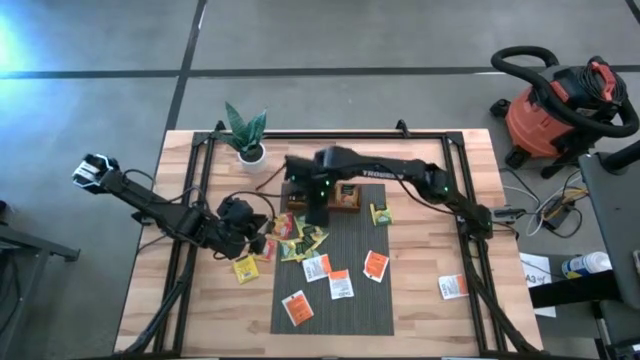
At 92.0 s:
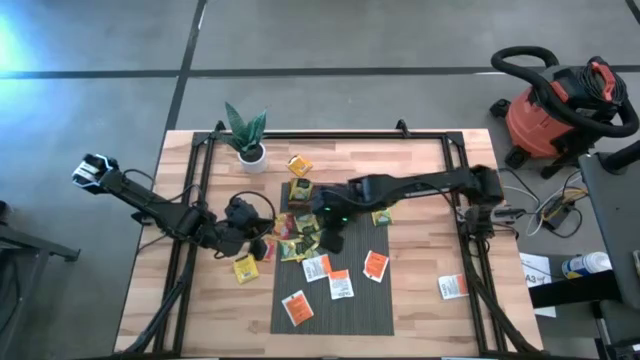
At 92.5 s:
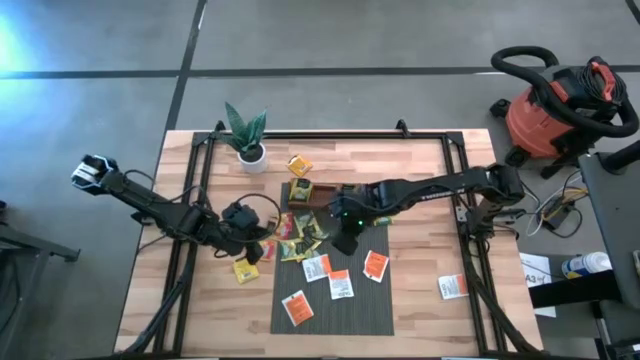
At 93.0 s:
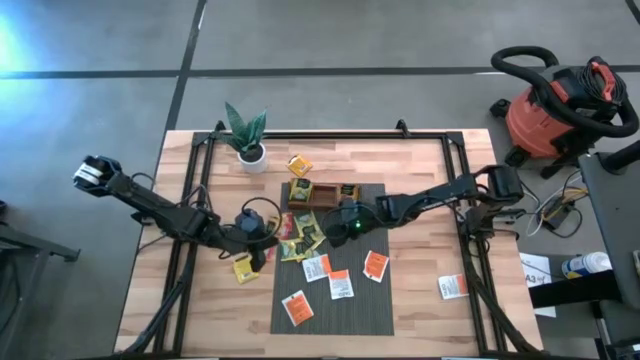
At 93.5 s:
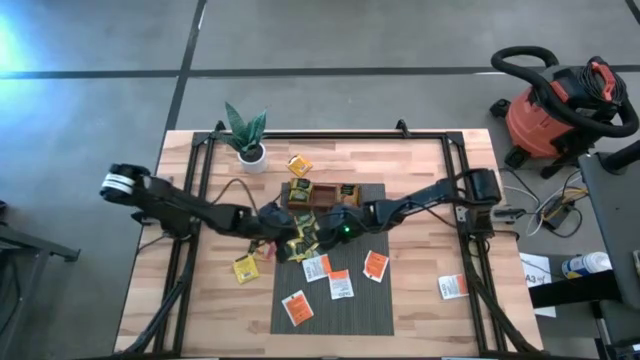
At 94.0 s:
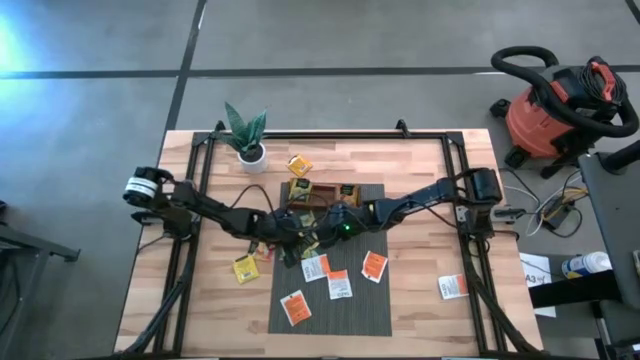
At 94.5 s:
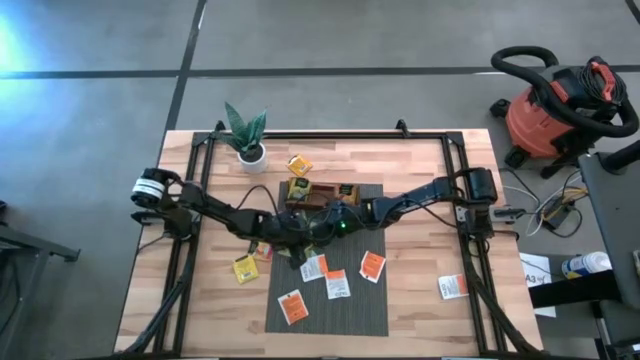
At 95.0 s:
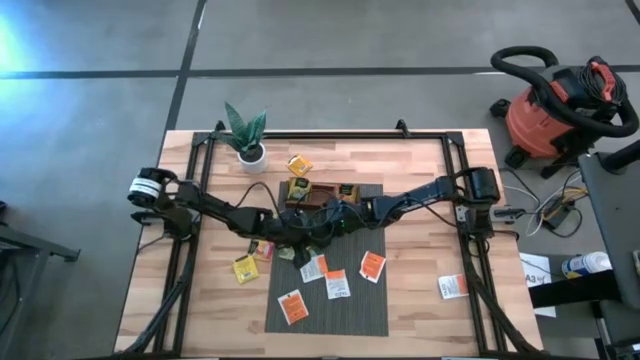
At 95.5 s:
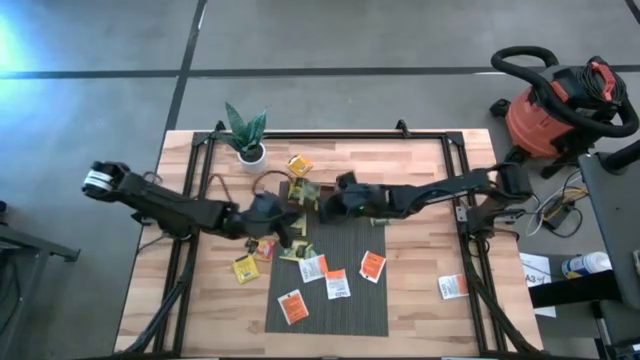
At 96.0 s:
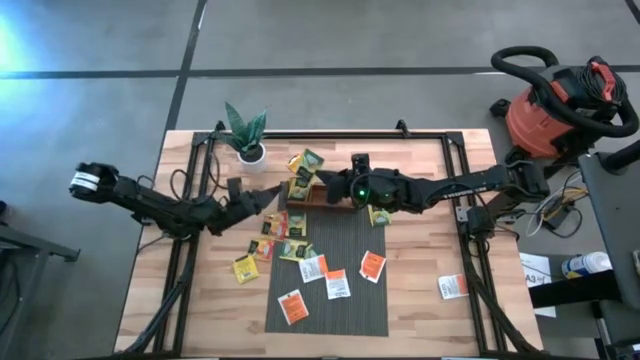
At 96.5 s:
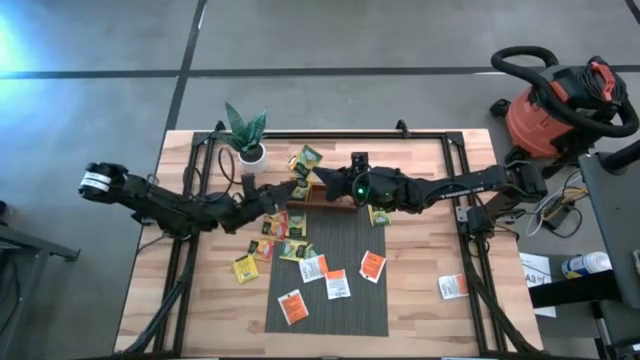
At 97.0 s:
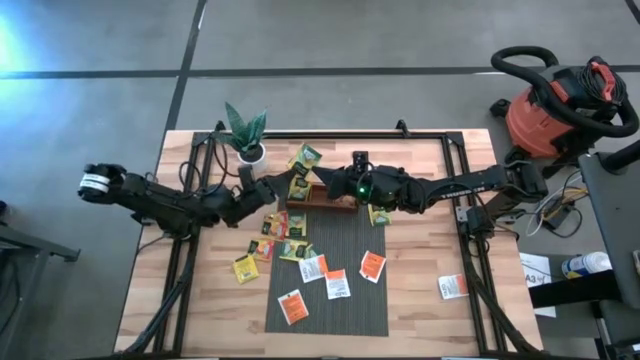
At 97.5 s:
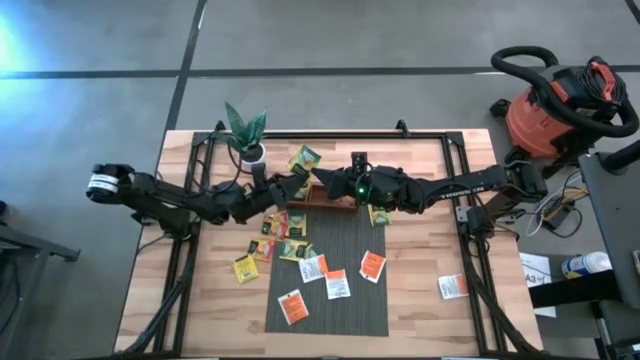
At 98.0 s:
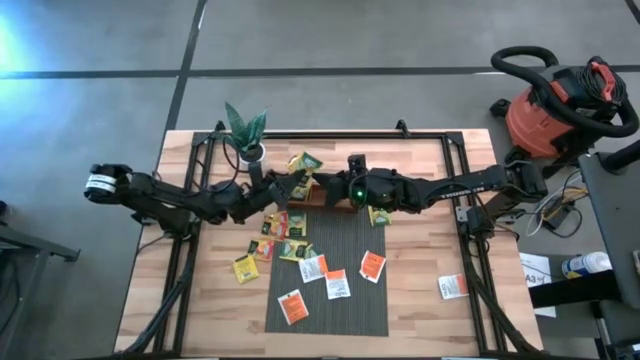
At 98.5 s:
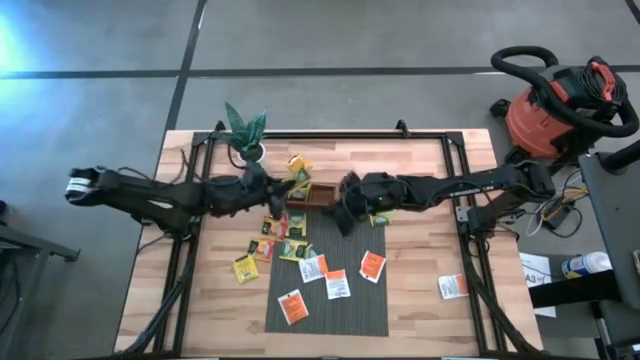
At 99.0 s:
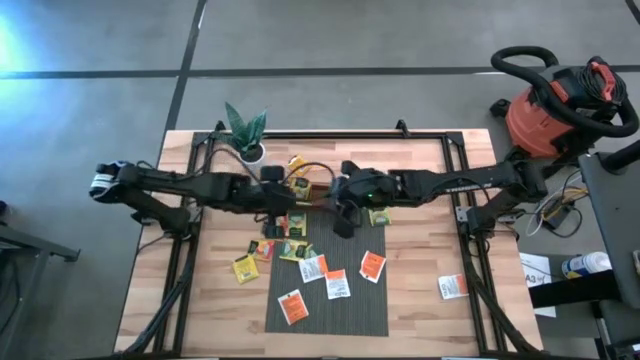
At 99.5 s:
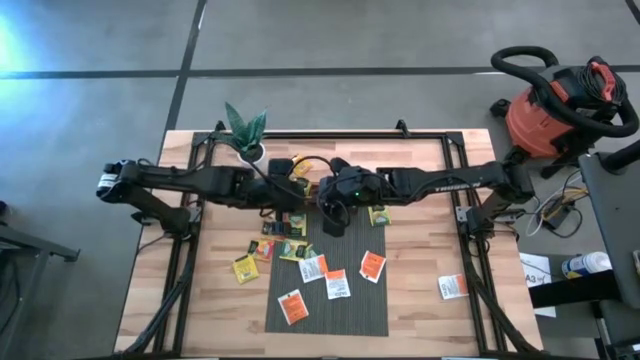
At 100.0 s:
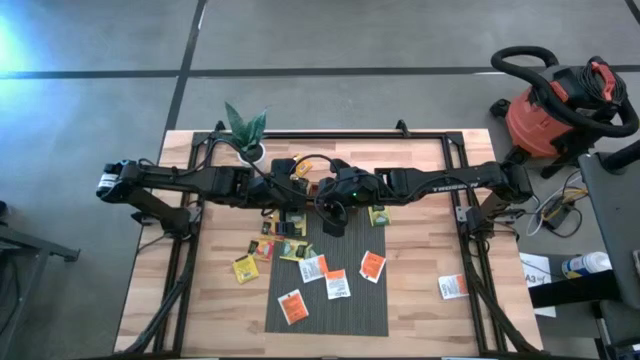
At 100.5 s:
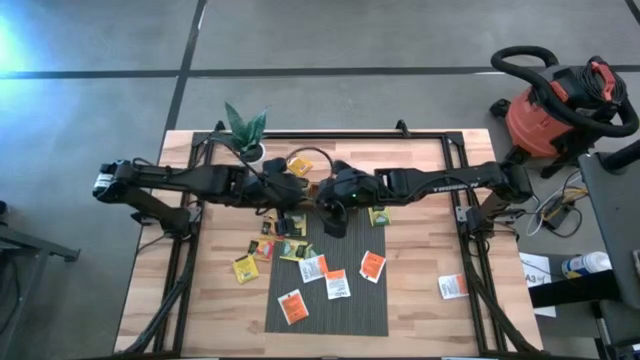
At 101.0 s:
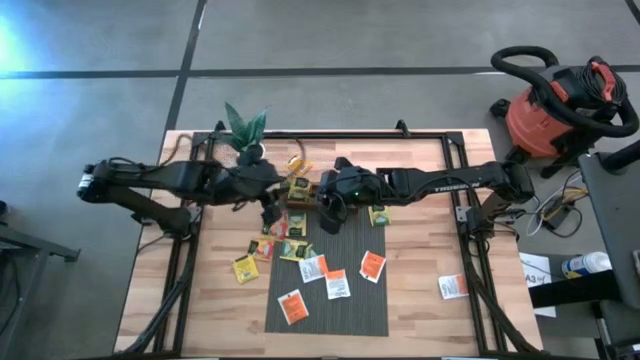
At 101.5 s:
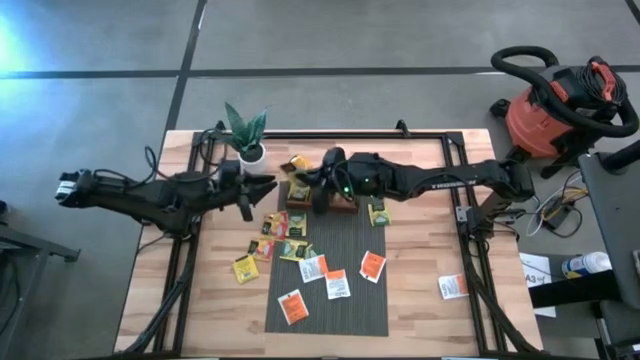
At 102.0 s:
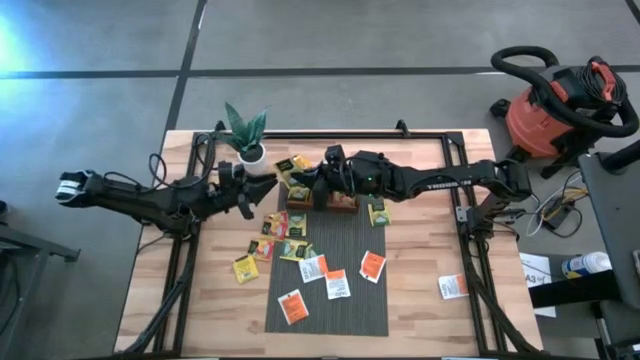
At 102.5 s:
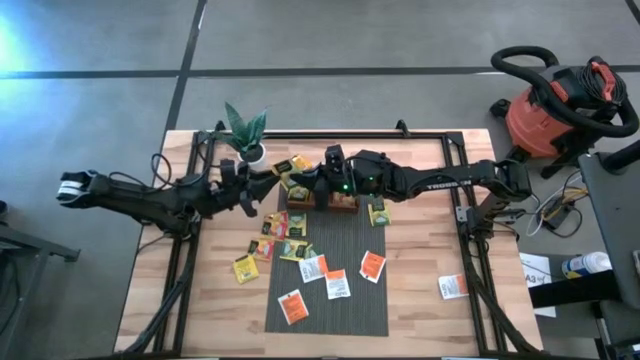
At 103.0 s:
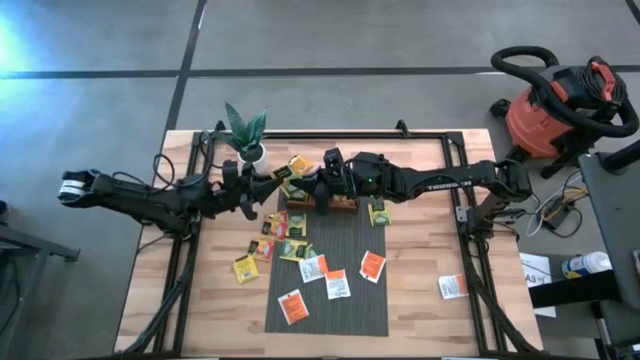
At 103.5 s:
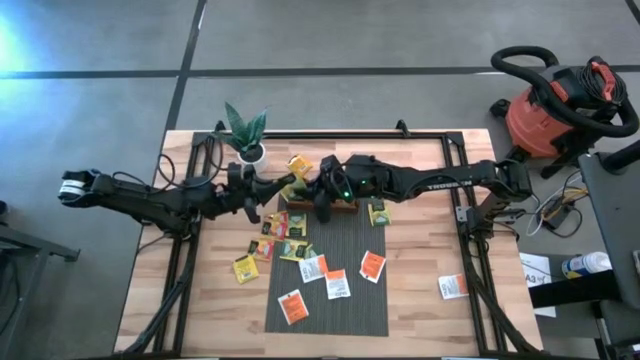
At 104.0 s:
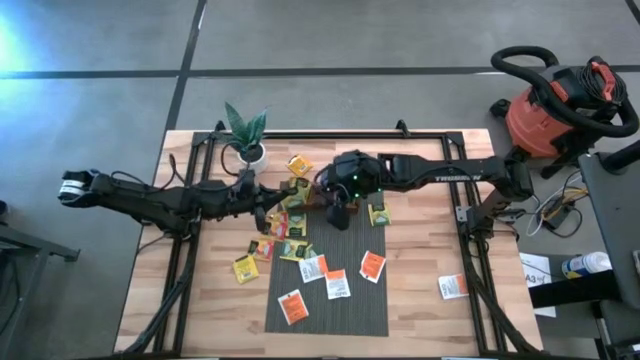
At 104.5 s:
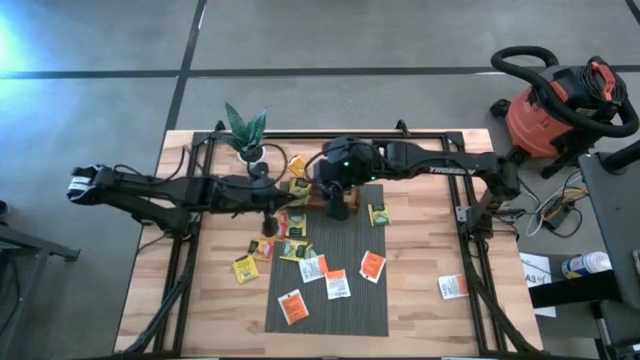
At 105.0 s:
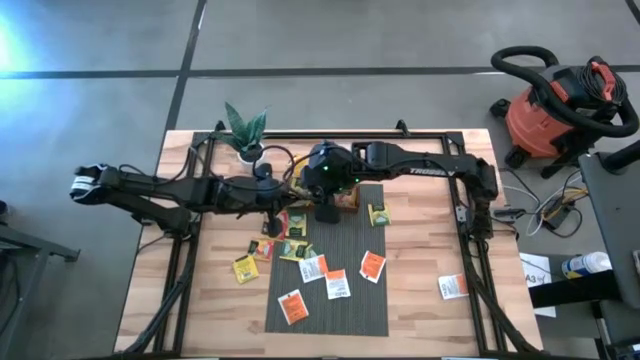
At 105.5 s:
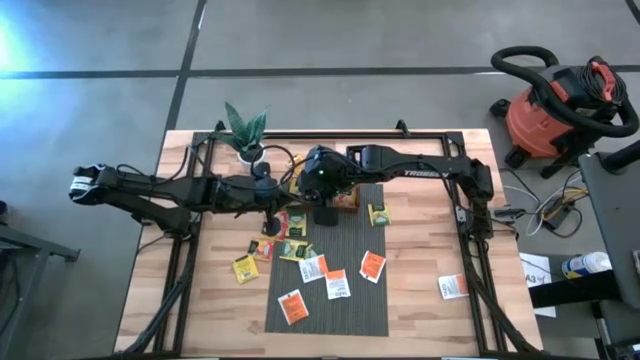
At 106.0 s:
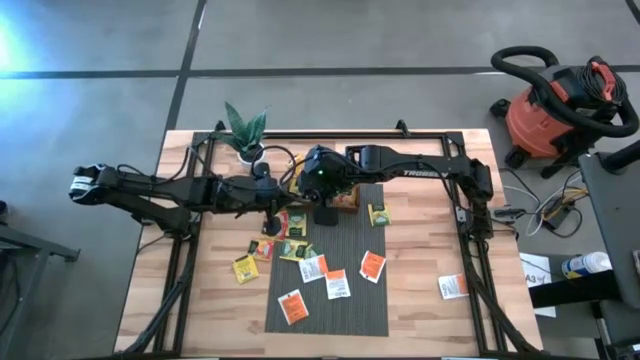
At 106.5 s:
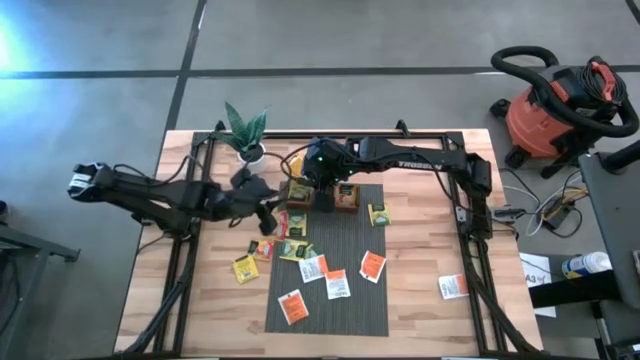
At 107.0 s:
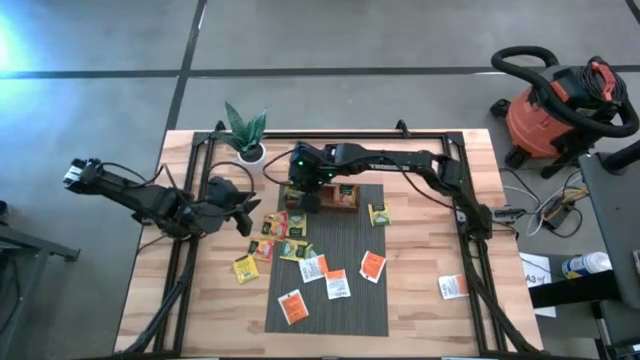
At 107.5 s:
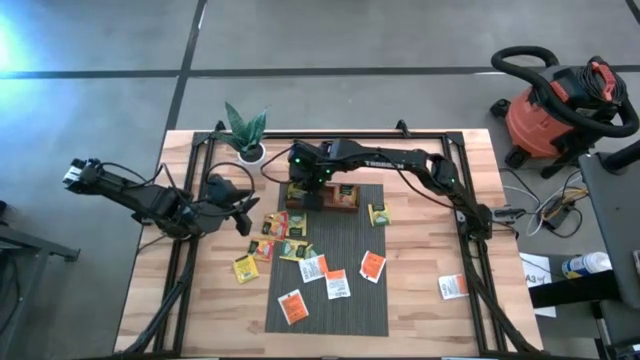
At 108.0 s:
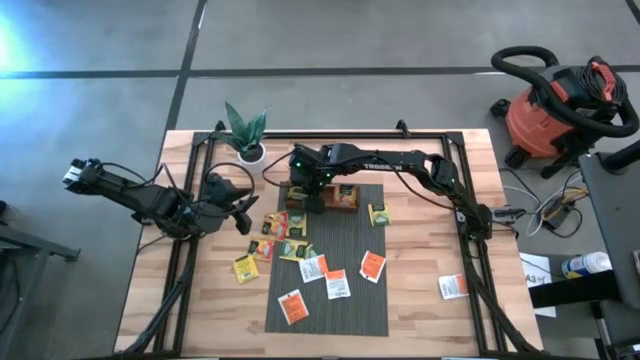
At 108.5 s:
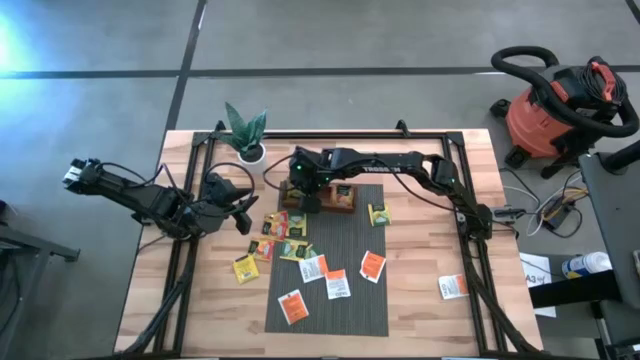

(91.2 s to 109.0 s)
Task: Pick & Place Tea
Put the yellow tea bag into the left compartment of the wooden organizer

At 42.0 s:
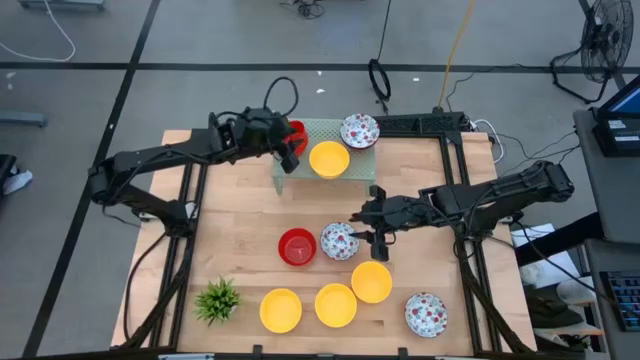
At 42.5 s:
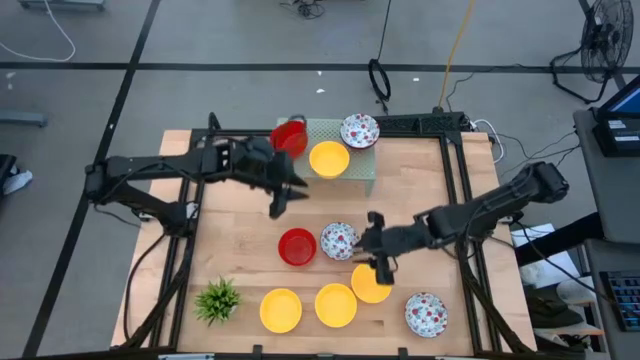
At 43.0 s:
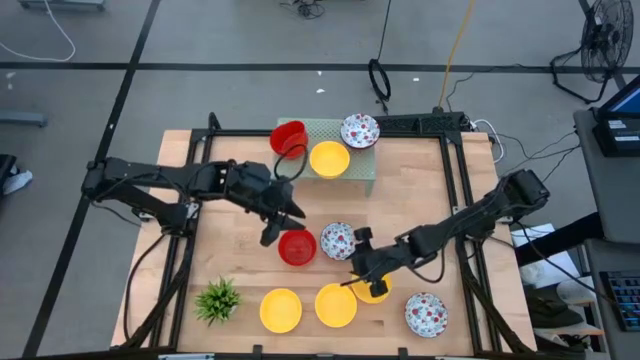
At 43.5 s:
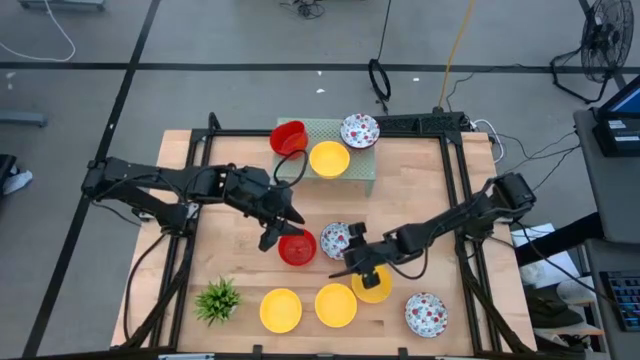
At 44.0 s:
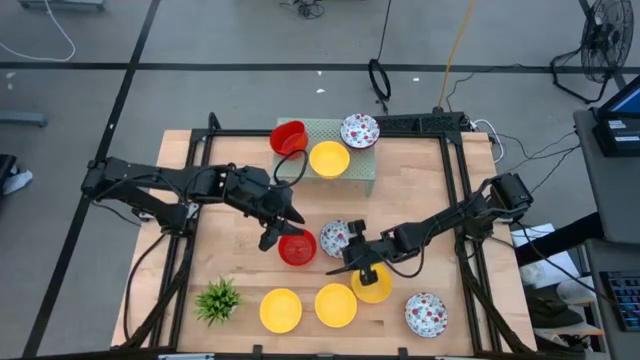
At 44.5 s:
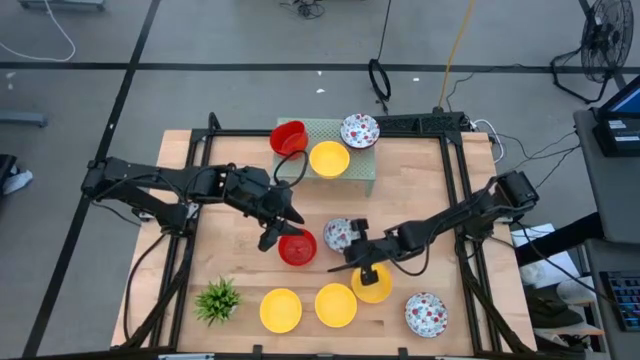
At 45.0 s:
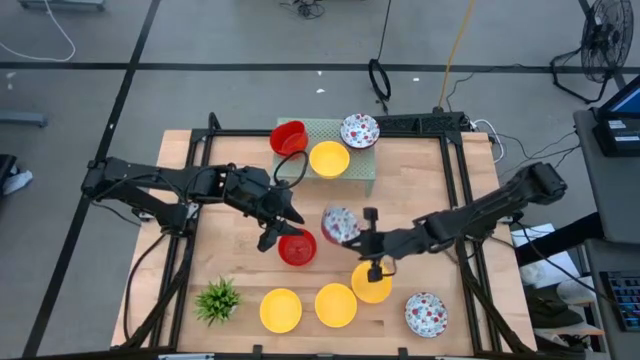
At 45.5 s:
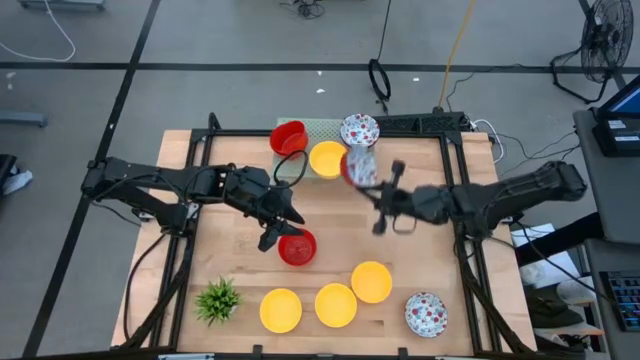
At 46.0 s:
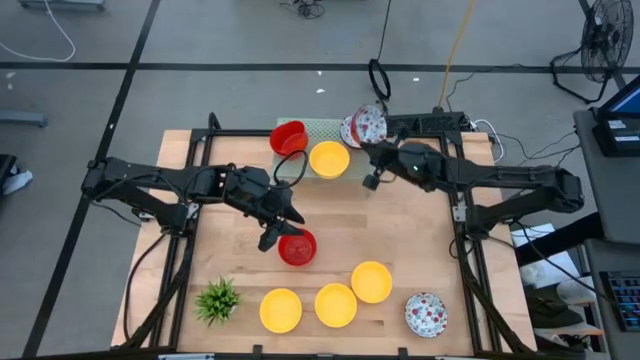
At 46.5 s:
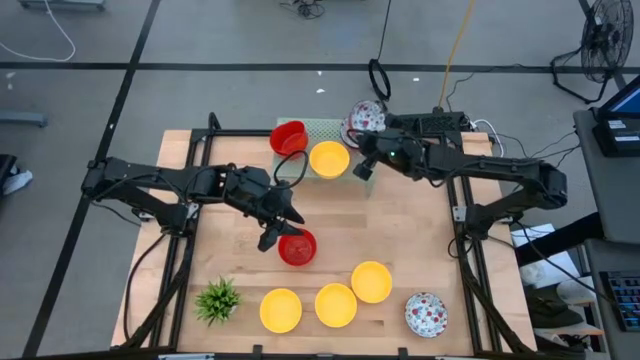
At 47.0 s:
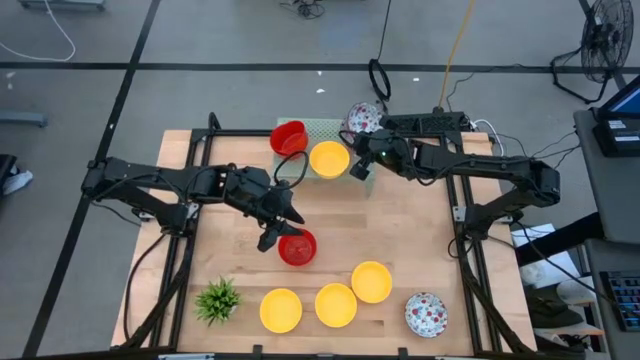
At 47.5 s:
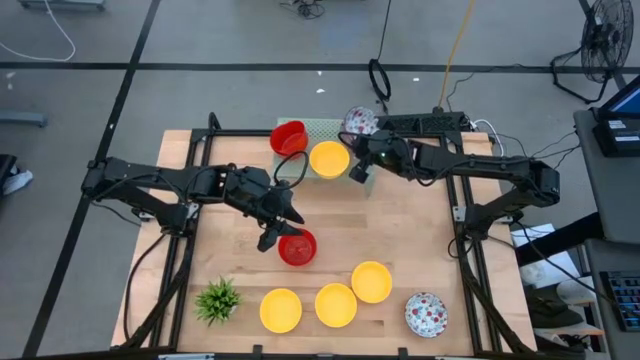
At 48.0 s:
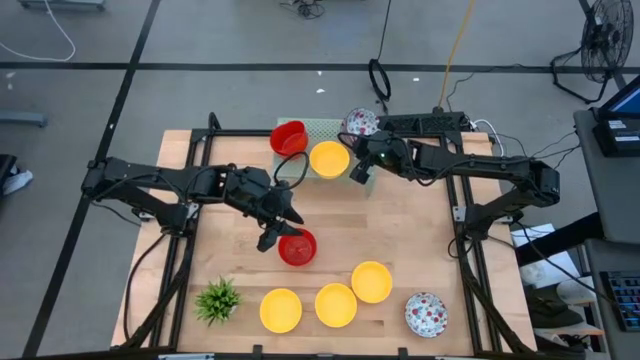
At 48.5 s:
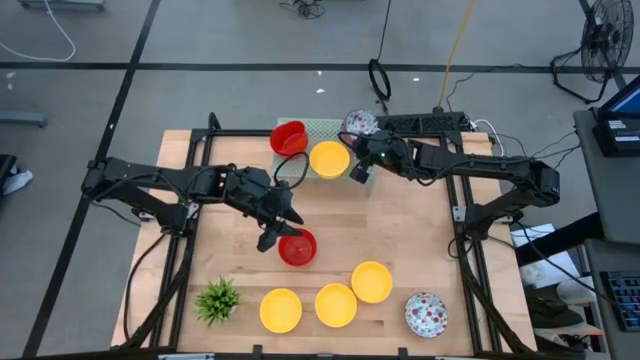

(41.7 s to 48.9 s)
Task: Pick & Place Mini bowls
Stack the red patterned bowl on top of the red patterned bowls on the shelf
